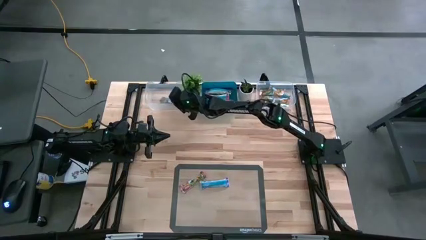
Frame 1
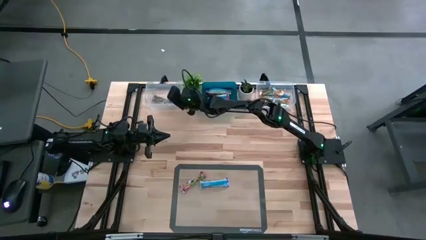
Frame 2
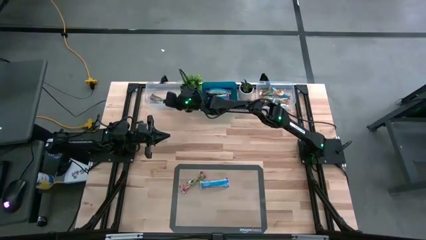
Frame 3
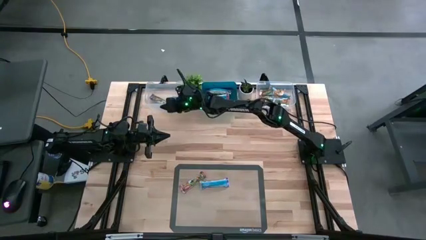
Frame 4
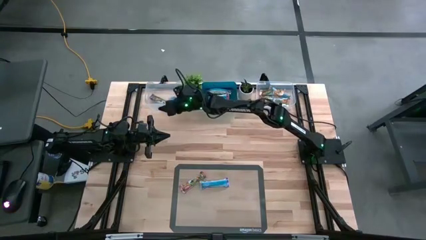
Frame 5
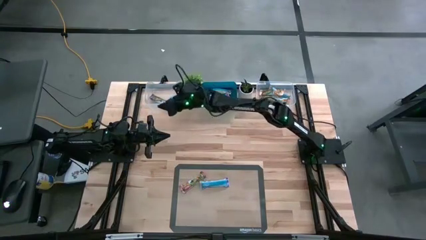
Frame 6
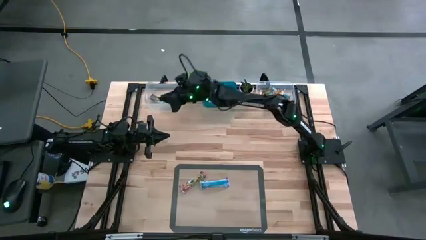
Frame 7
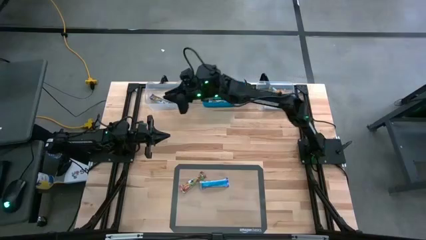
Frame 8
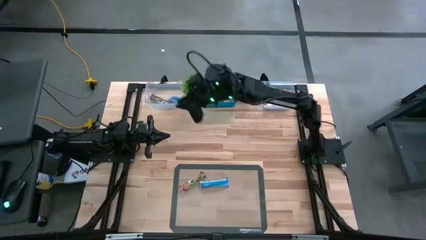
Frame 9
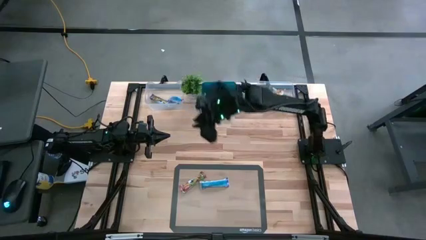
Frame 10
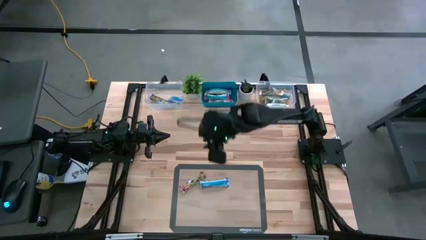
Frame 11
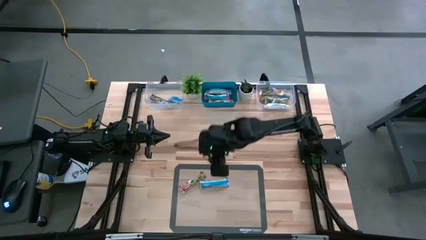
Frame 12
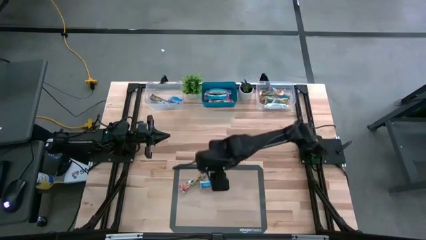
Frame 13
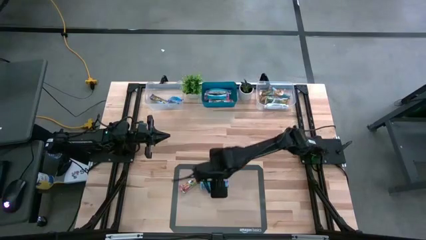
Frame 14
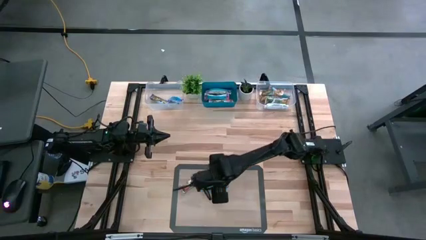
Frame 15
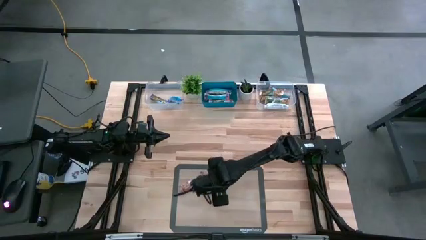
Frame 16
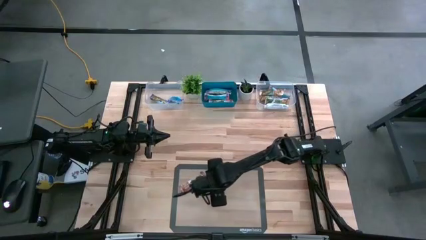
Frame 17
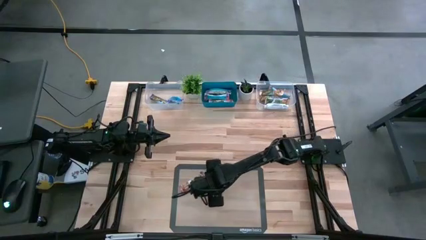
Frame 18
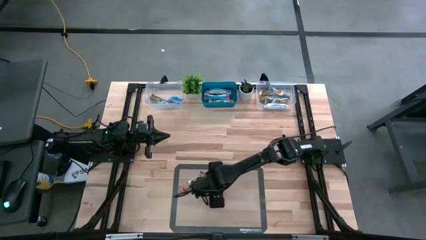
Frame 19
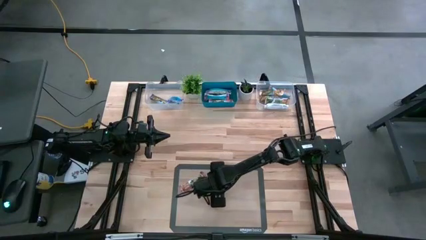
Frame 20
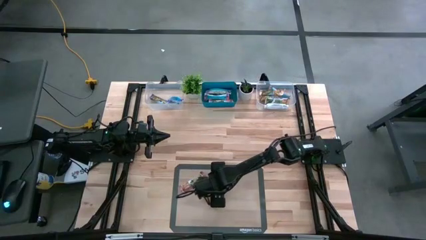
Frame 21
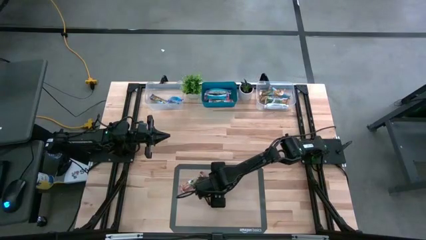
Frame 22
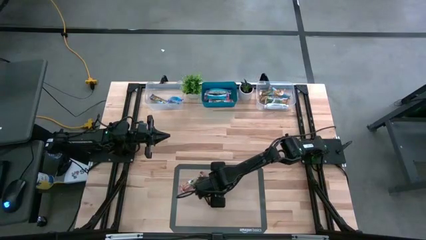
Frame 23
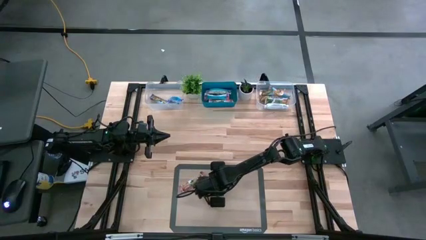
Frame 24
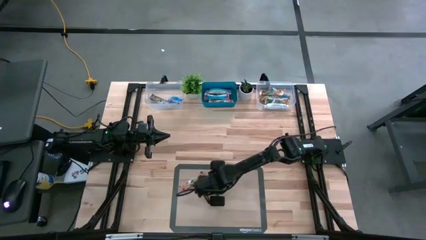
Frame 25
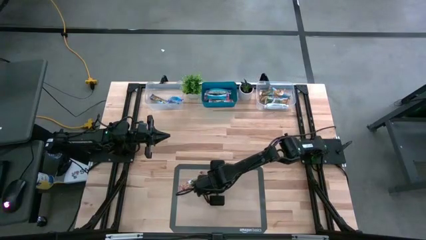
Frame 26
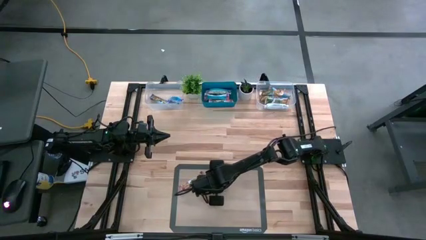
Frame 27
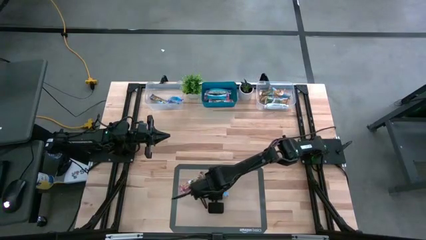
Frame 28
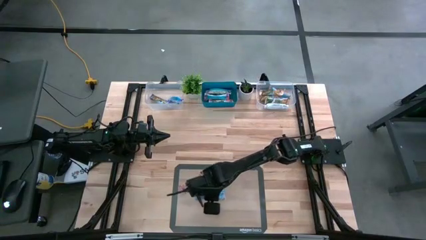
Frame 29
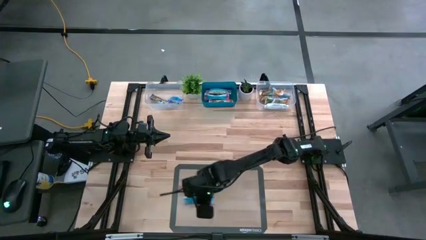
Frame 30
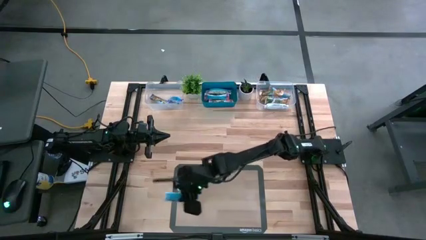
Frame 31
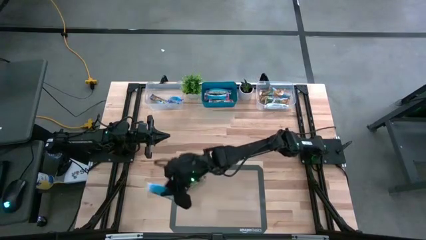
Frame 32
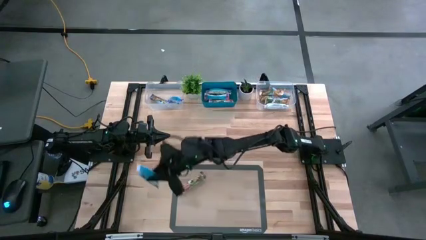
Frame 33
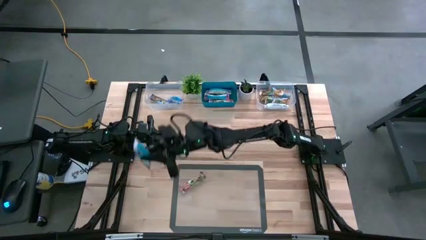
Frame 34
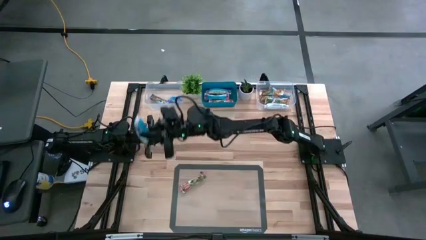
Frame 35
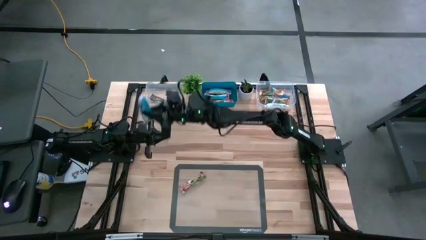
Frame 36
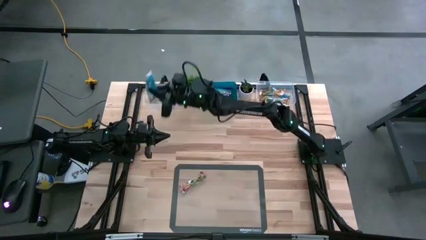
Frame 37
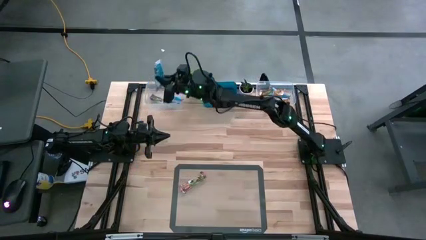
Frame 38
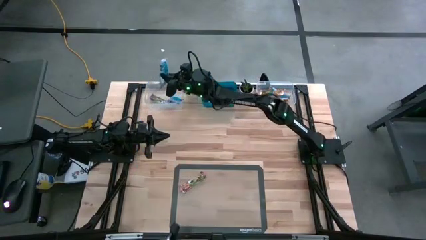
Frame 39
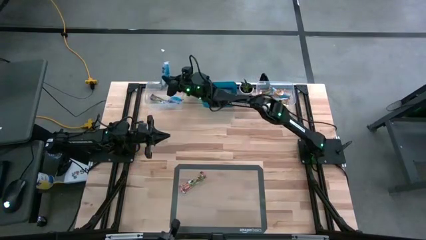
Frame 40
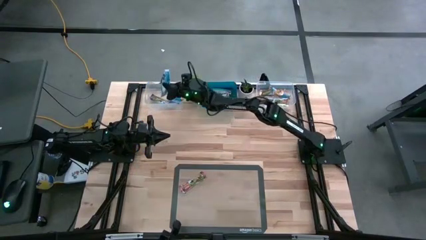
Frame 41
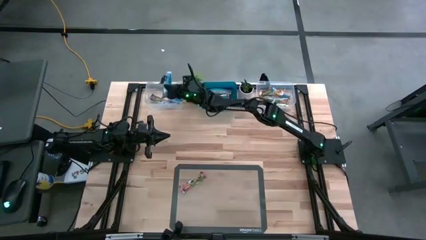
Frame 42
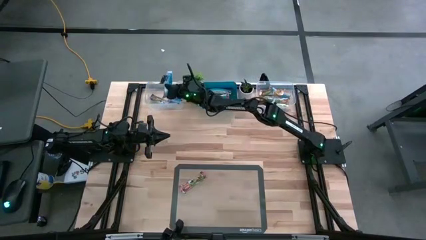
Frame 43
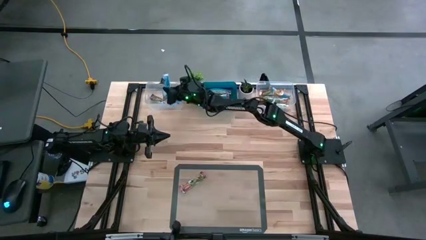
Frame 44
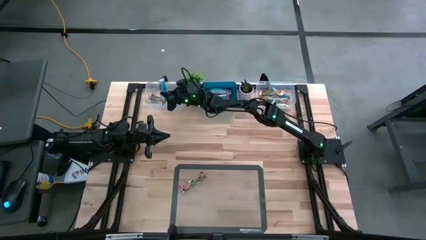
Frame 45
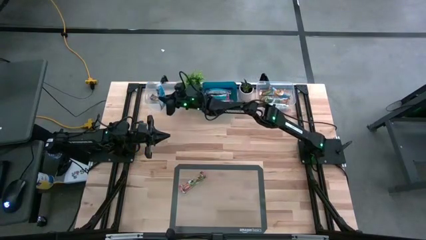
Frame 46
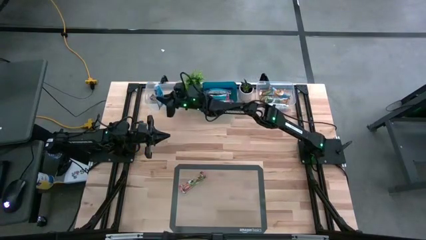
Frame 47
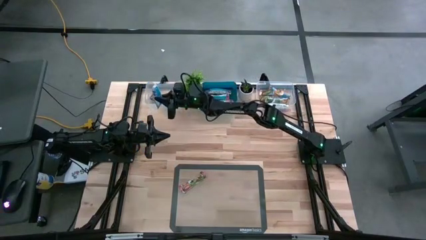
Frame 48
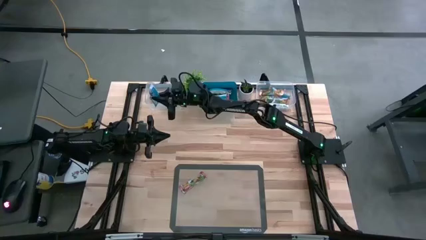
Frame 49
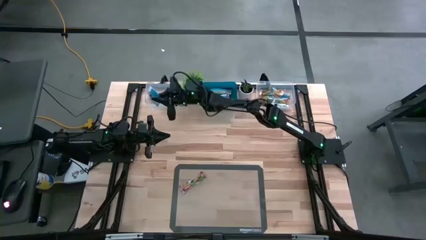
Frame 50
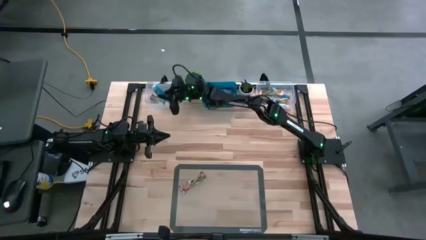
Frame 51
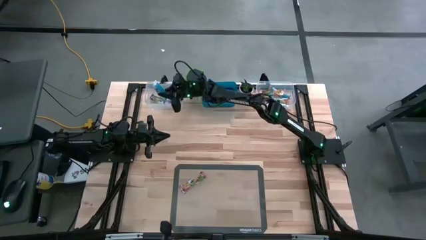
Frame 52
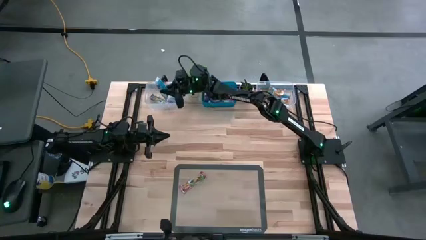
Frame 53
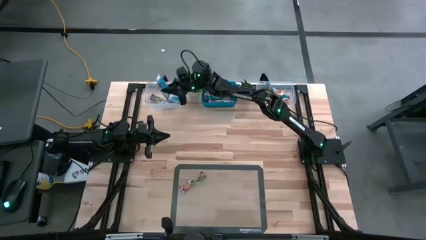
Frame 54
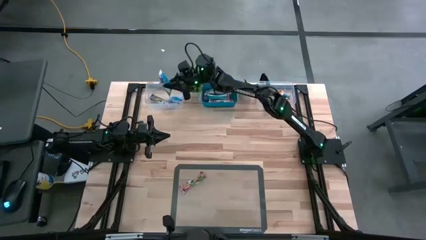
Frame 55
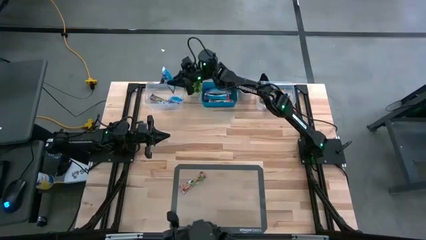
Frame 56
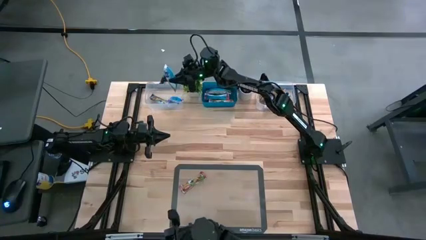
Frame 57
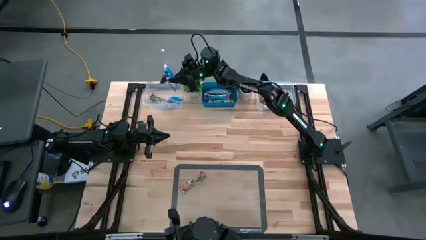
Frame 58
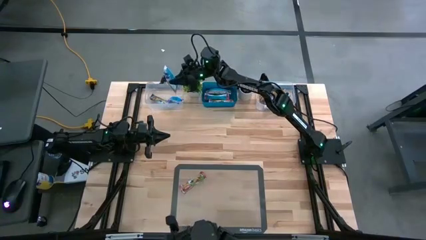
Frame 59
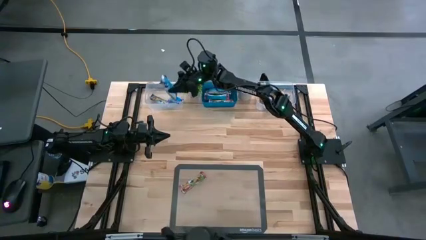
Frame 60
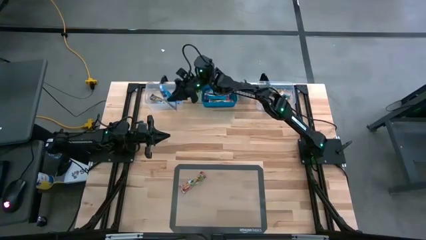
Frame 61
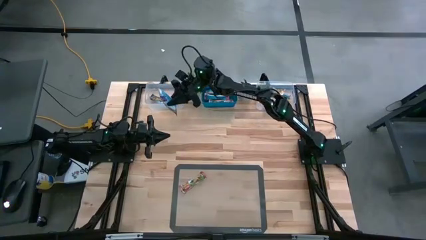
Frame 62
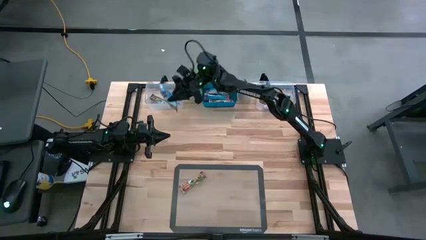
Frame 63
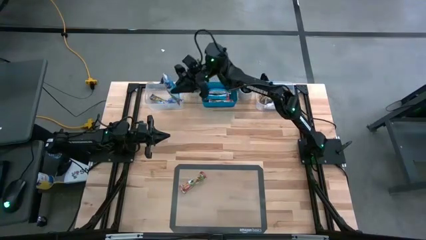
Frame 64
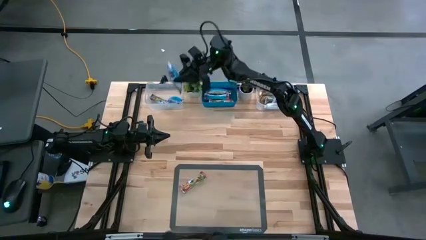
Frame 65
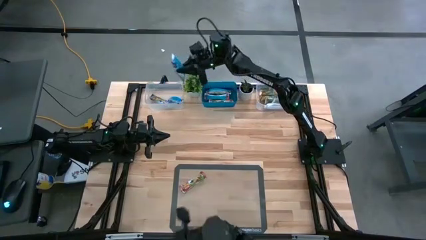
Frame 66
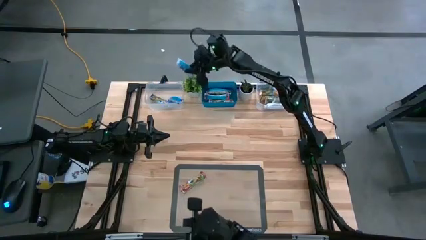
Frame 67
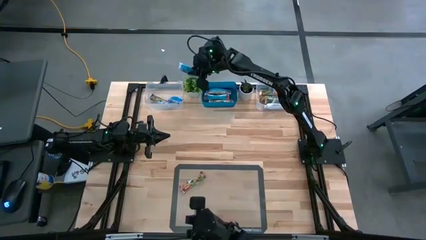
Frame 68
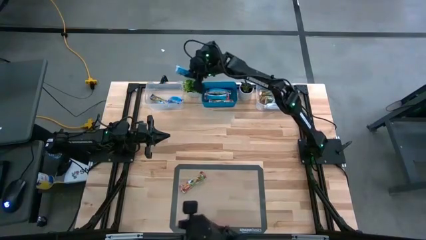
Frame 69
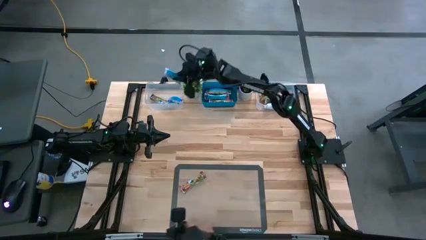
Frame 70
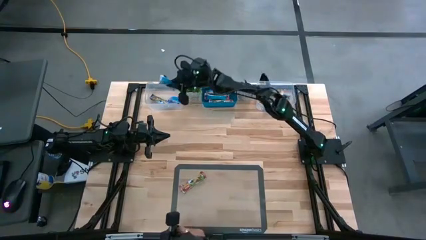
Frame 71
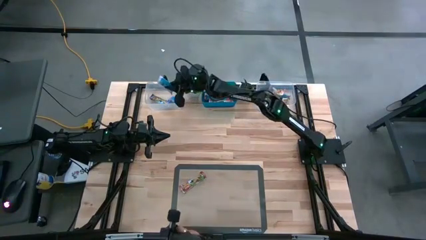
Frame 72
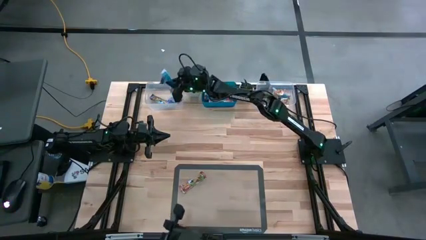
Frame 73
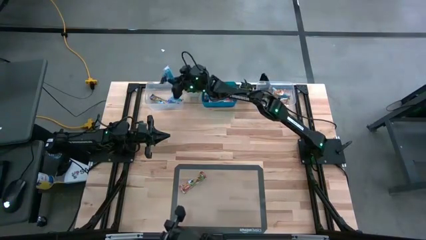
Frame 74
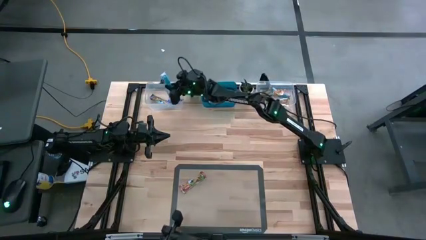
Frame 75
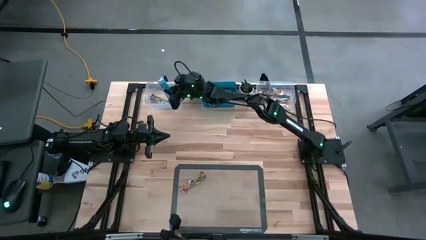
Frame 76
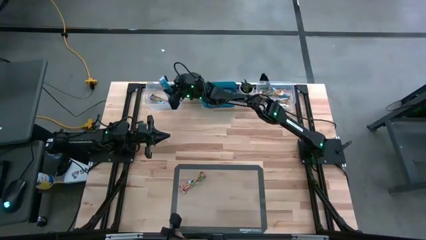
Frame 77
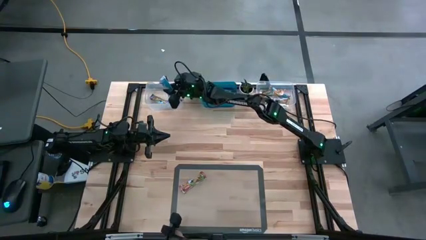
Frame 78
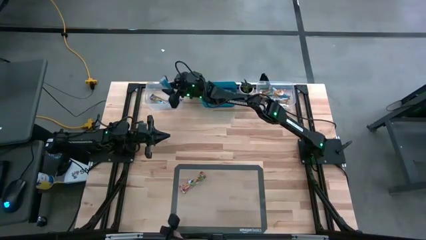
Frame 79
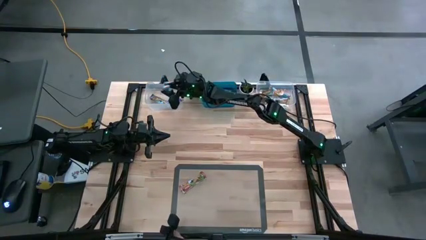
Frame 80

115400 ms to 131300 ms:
Task: Pick and place Granola Bars by type
Put the blue granola bar into the left transparent bin

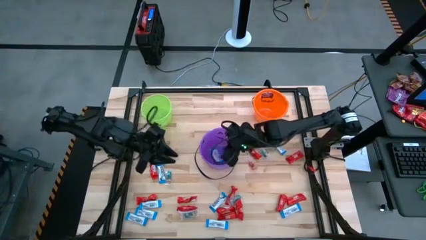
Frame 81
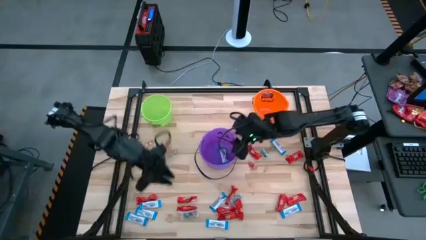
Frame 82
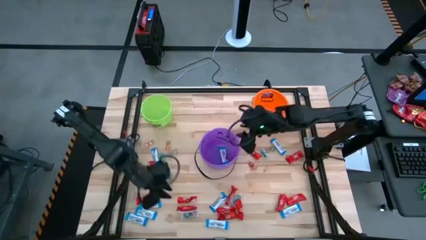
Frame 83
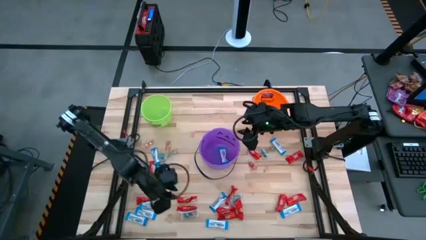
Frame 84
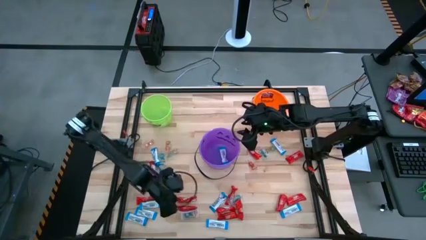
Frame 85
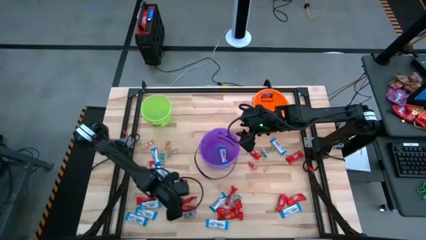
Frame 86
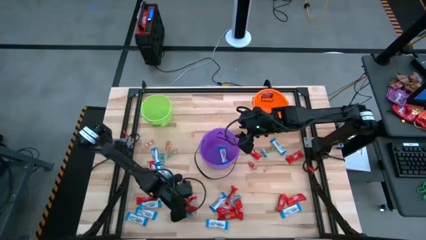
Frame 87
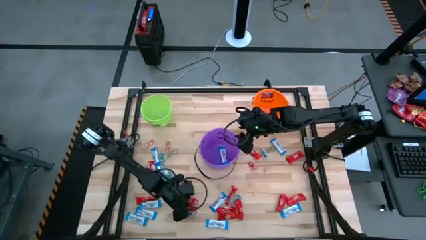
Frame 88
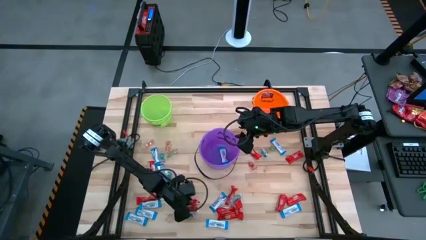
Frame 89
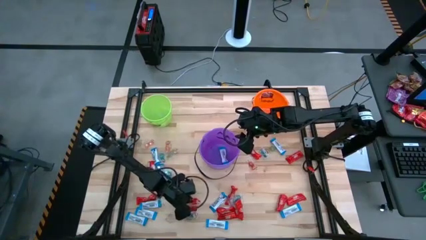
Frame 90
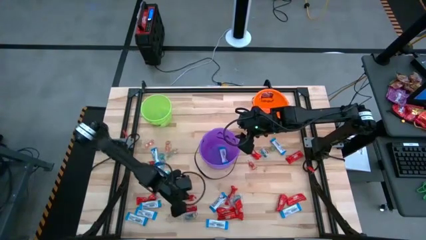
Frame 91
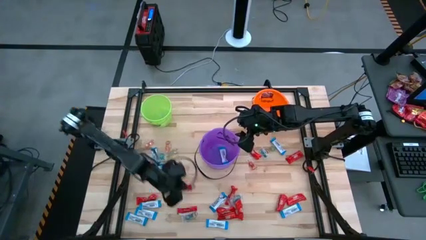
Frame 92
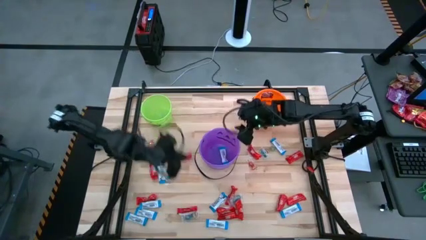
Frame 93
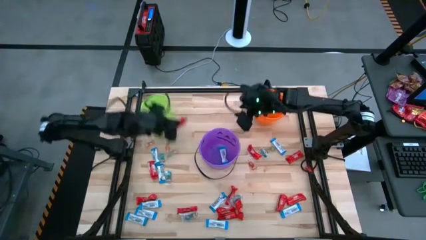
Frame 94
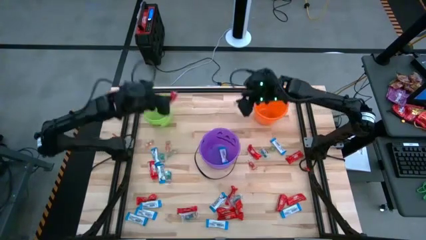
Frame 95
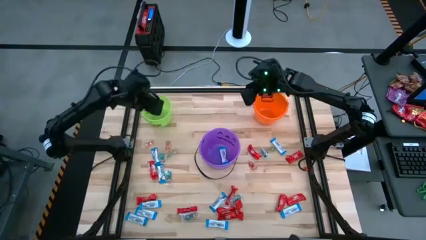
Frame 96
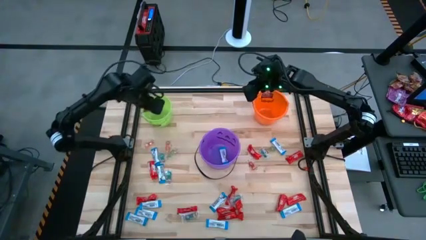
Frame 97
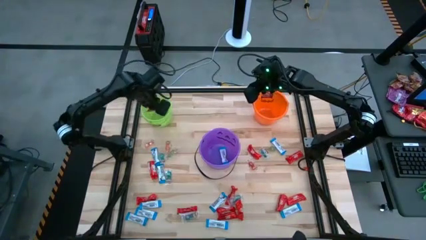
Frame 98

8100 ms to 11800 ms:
Task: Sort candy by brand, put in halloween buckets
Put the red chocolate into the green bucket
